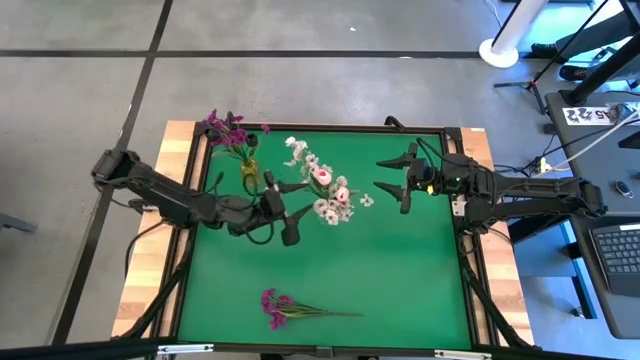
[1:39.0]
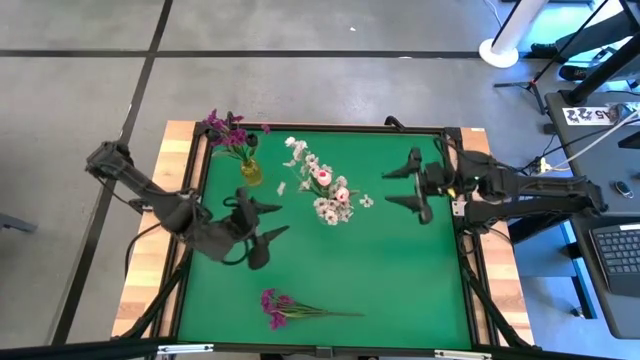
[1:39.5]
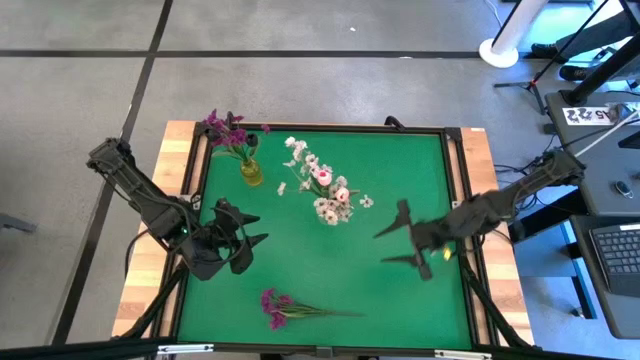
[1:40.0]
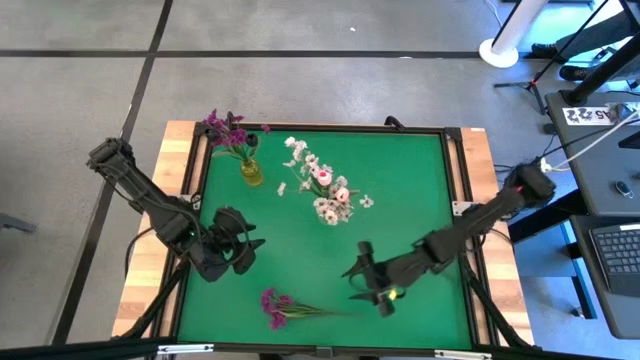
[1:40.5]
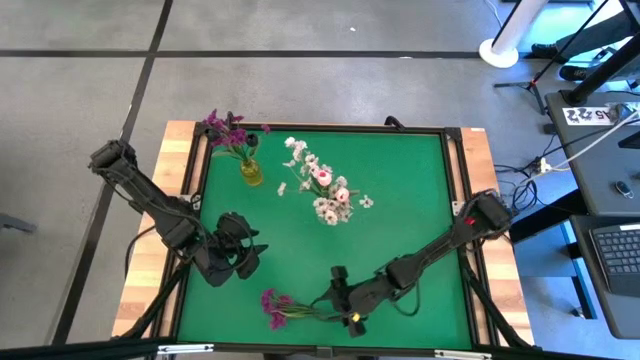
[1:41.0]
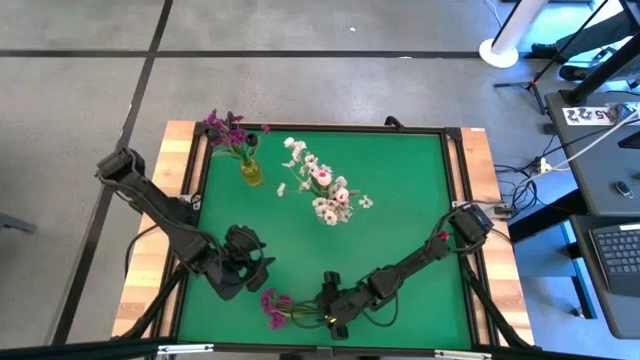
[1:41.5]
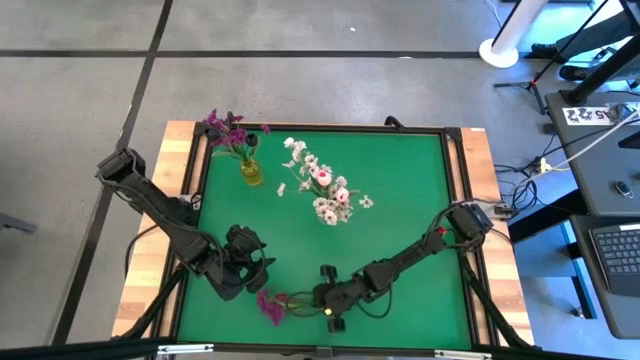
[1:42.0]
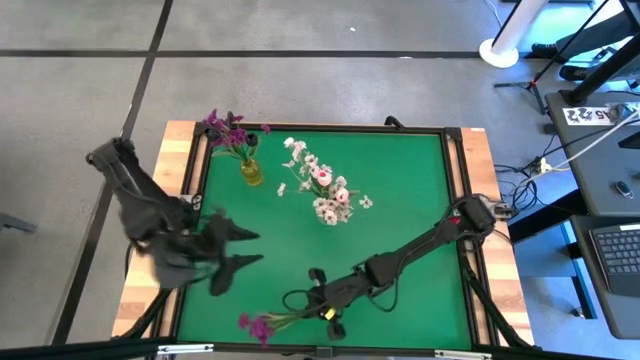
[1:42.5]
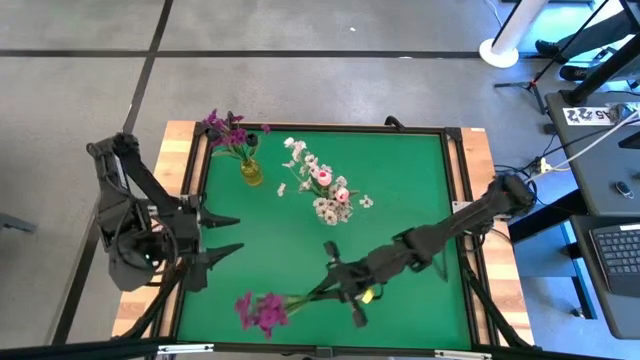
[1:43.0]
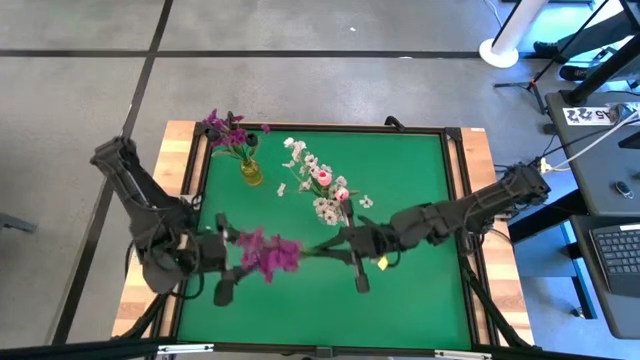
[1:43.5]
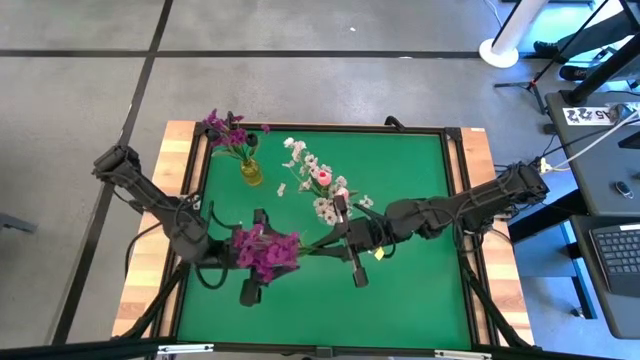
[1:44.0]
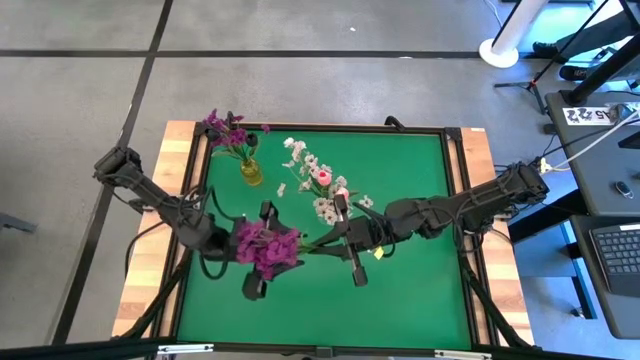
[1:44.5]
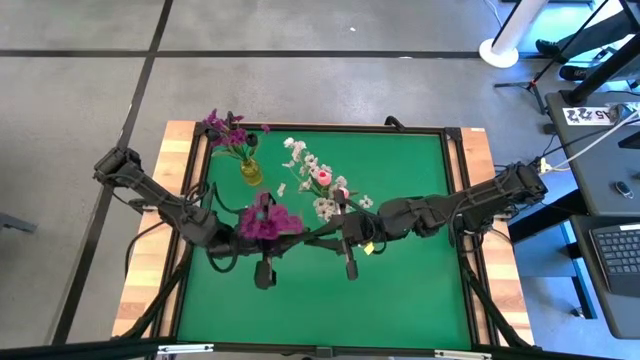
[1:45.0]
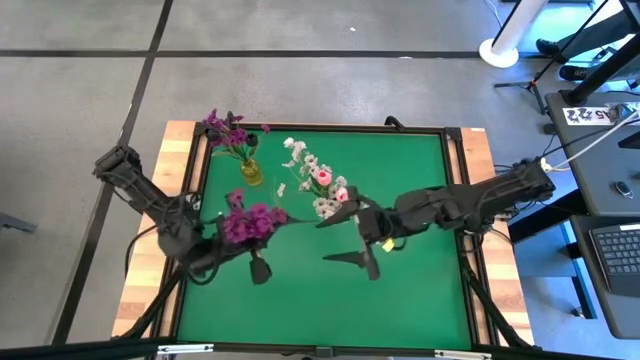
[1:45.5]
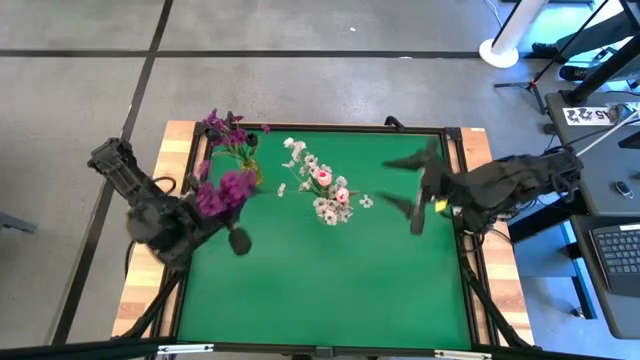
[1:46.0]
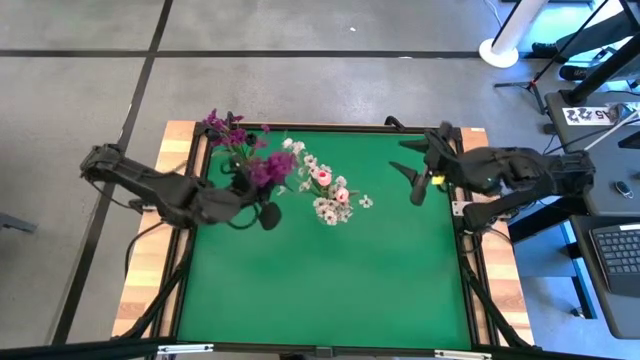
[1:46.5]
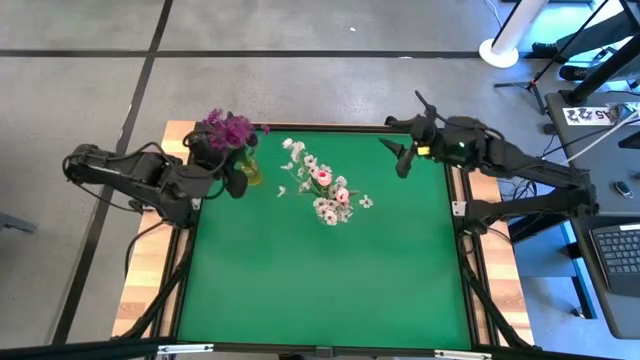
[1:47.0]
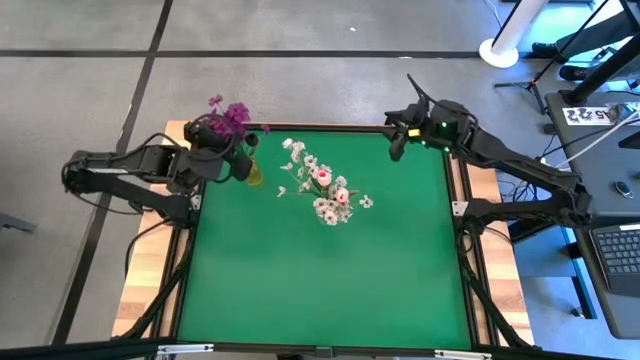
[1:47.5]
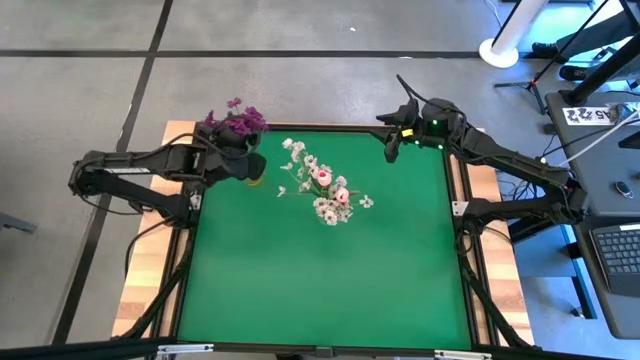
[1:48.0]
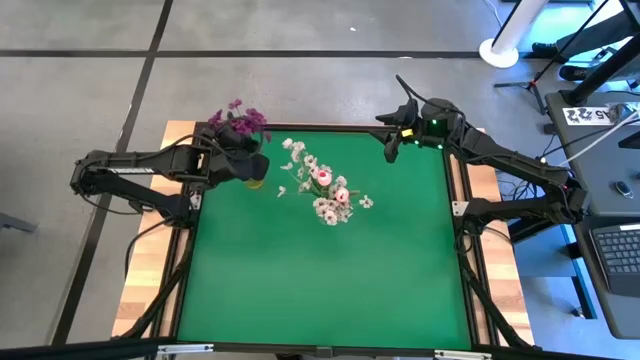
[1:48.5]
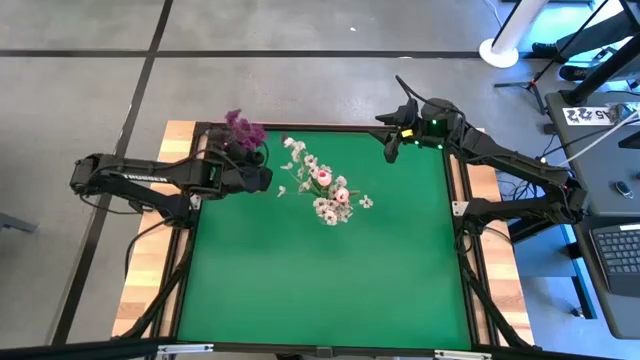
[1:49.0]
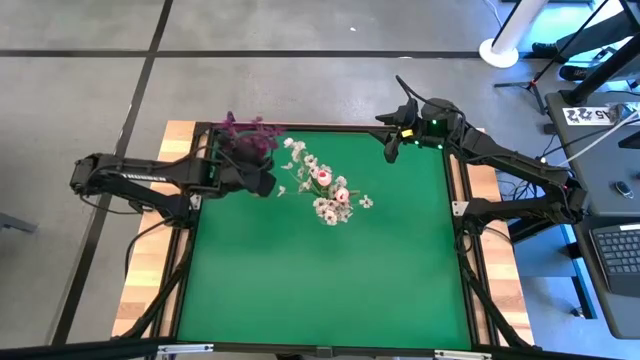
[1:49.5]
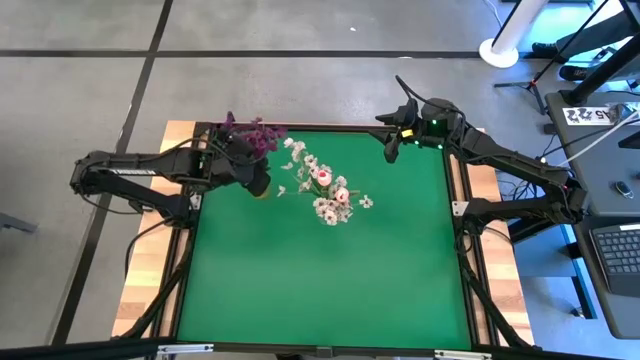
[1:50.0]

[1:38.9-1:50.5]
Task: Sort flowers into vase by color
Put the purple flowers into the yellow vase

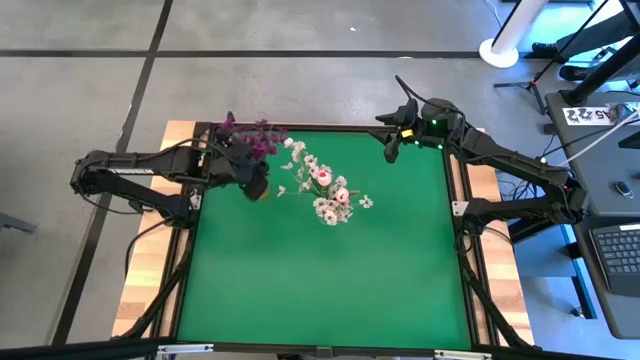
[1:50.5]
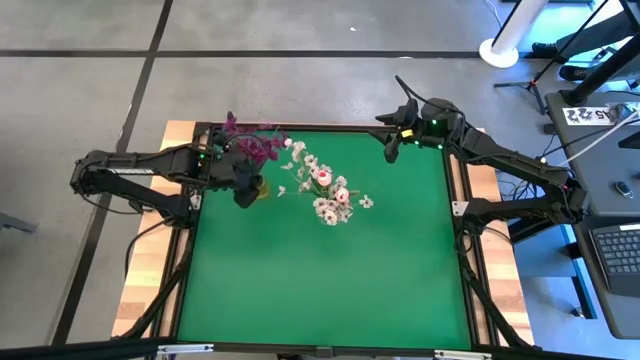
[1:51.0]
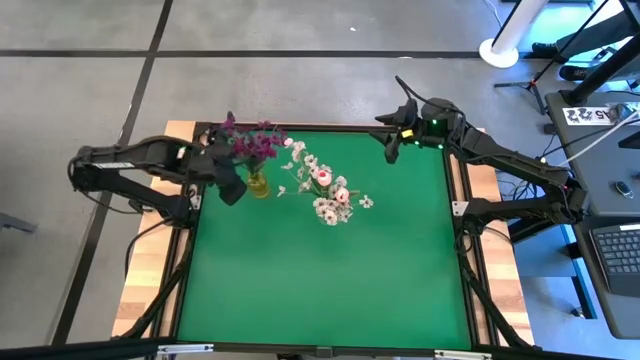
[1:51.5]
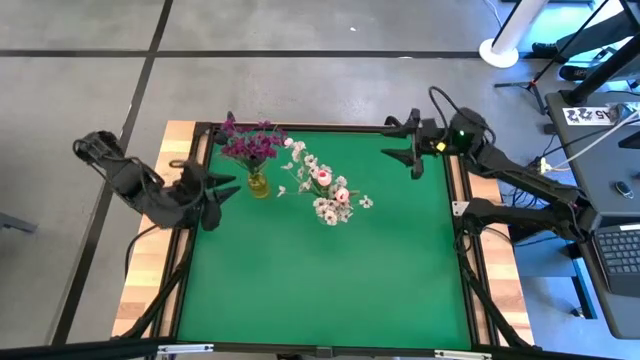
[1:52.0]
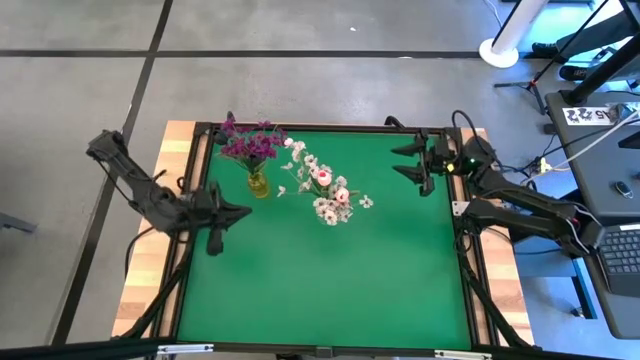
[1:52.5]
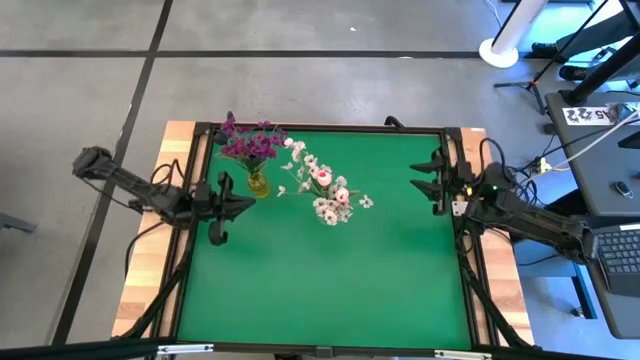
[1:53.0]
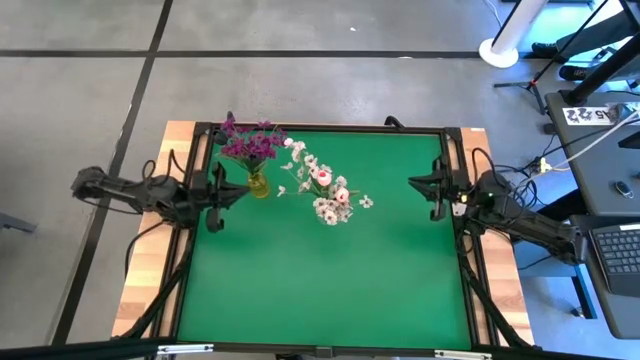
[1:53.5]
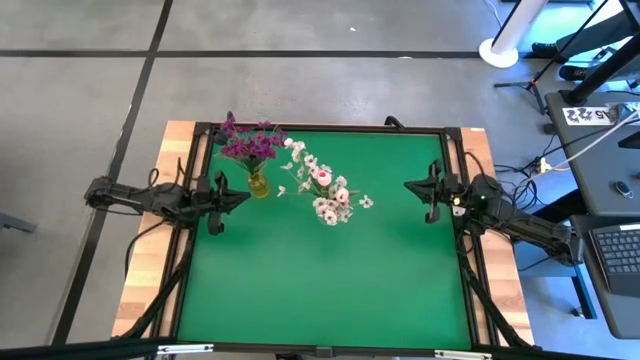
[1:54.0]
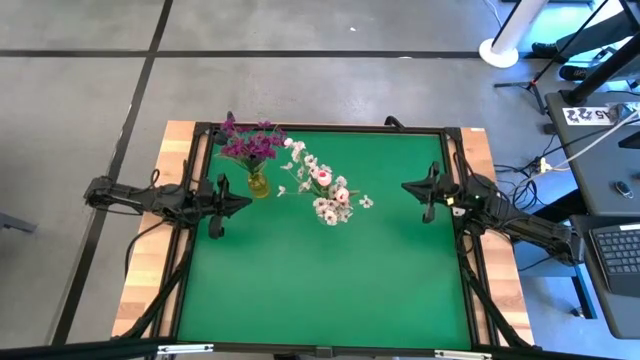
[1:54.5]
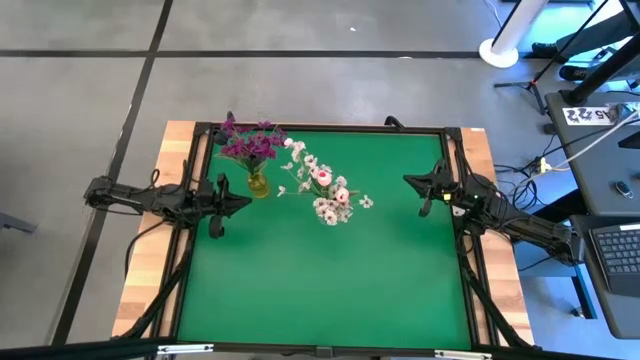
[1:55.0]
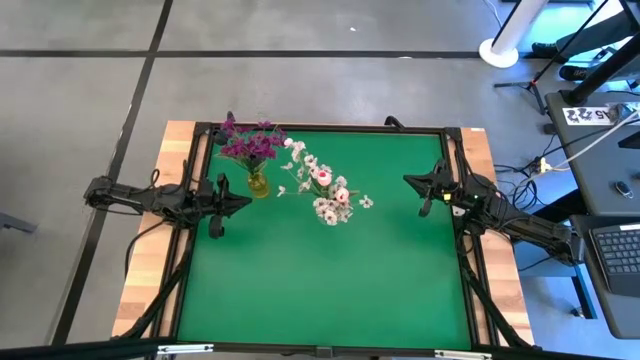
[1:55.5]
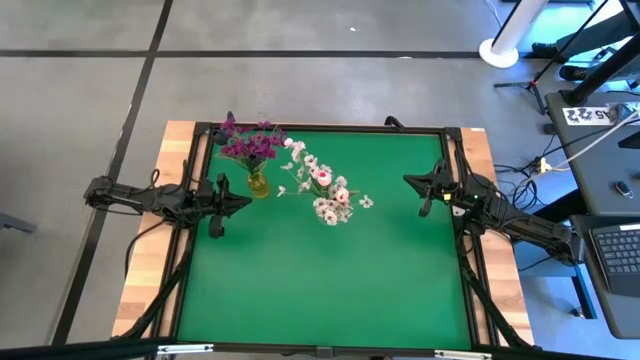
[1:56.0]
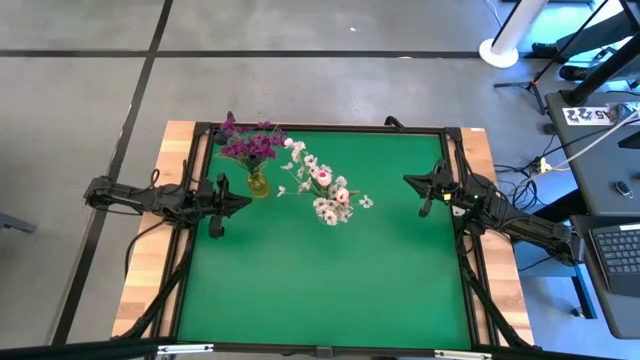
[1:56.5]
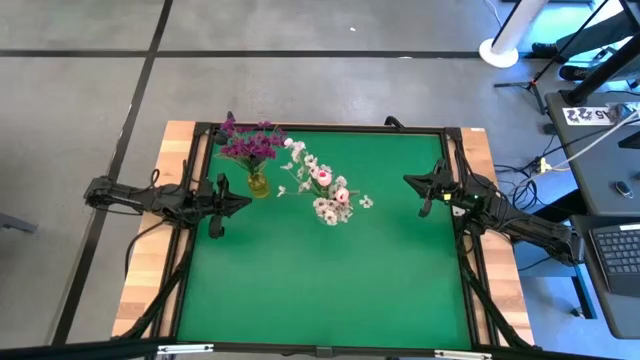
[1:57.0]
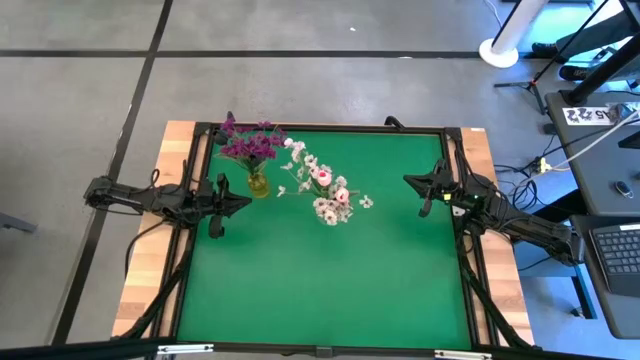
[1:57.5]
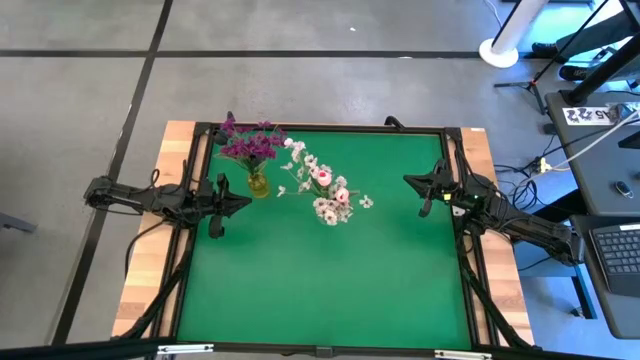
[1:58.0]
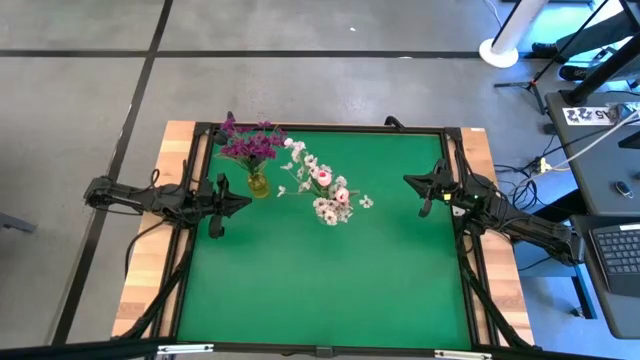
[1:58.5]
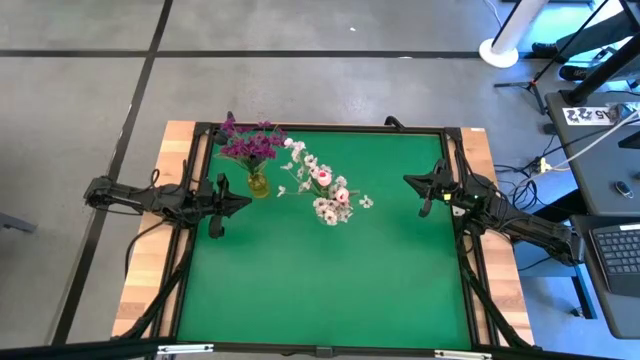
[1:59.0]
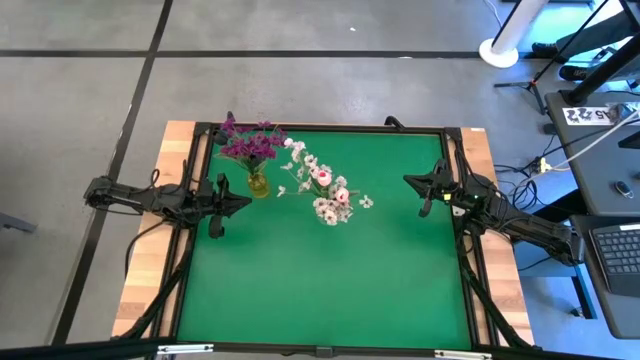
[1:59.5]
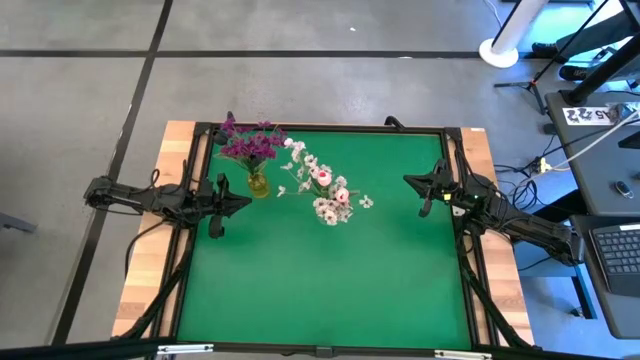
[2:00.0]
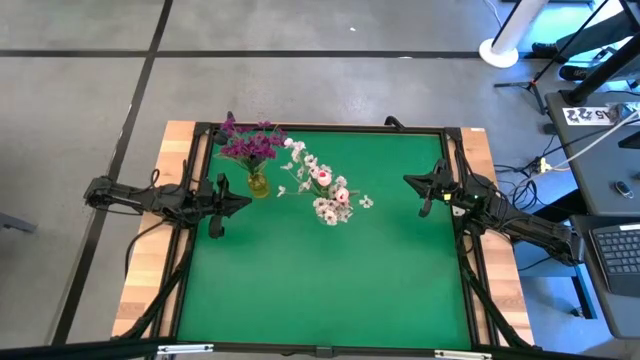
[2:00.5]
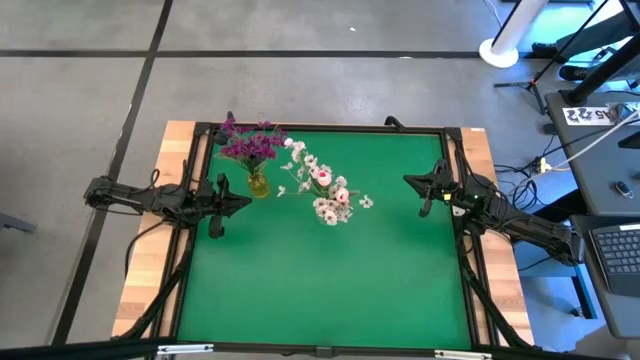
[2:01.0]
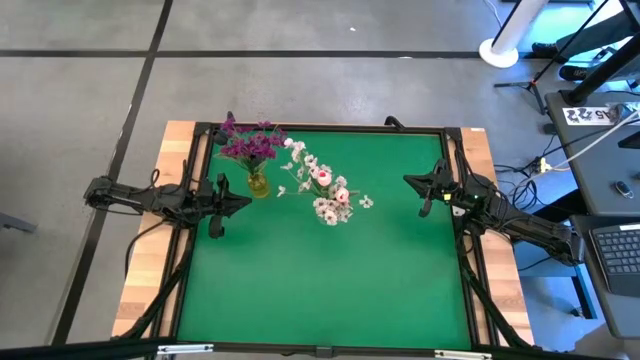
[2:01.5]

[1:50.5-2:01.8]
Return to Home Position
